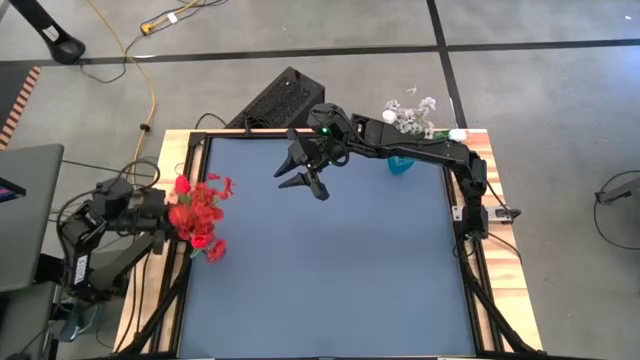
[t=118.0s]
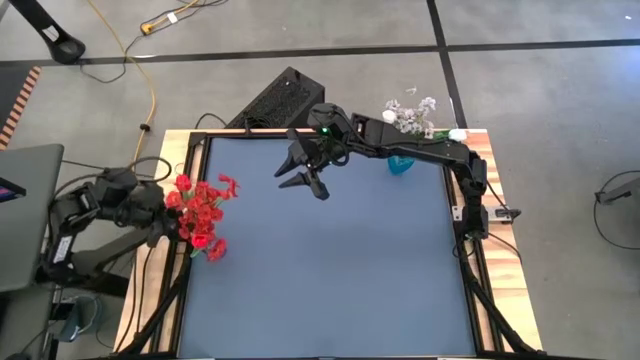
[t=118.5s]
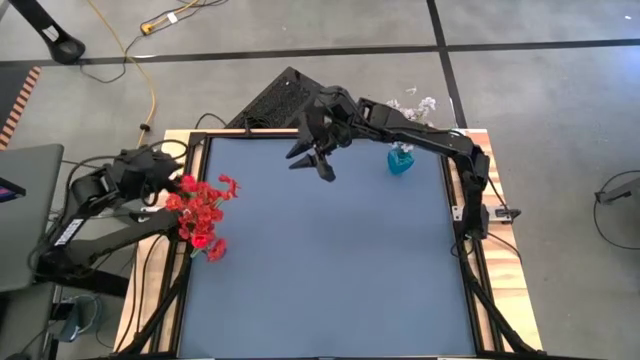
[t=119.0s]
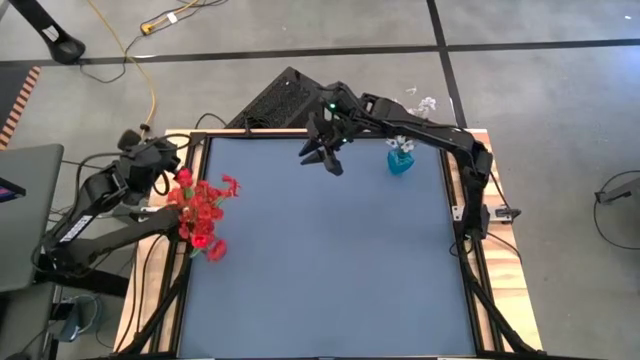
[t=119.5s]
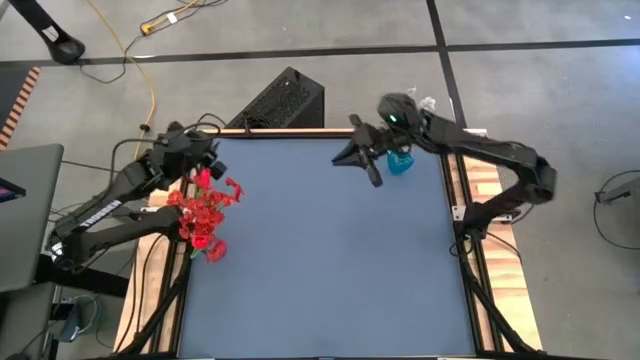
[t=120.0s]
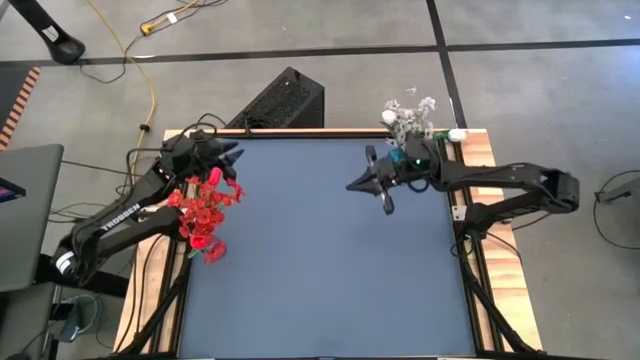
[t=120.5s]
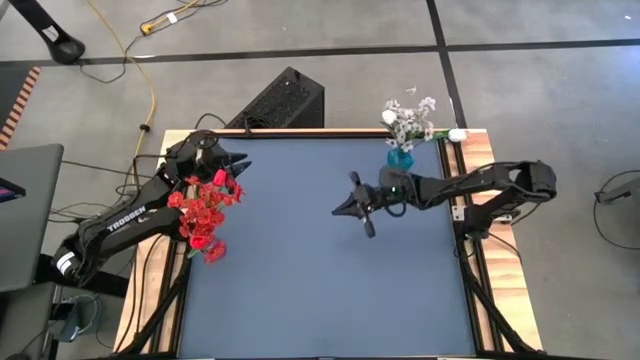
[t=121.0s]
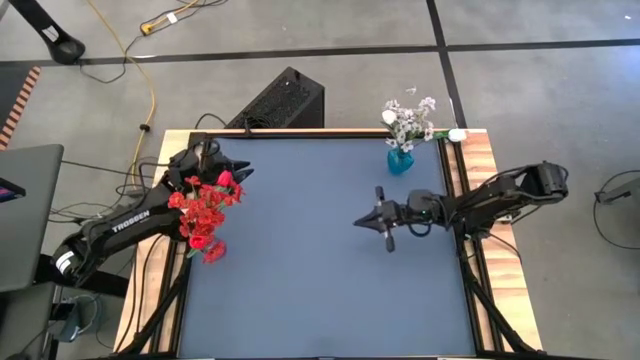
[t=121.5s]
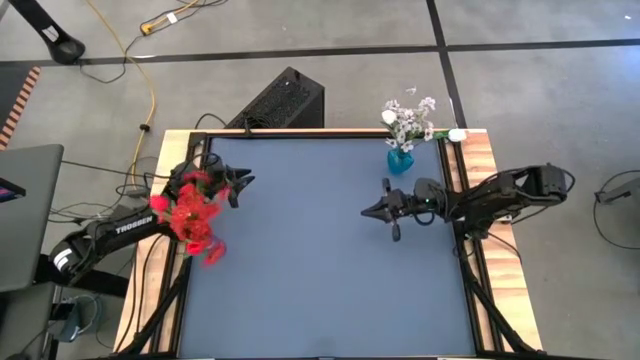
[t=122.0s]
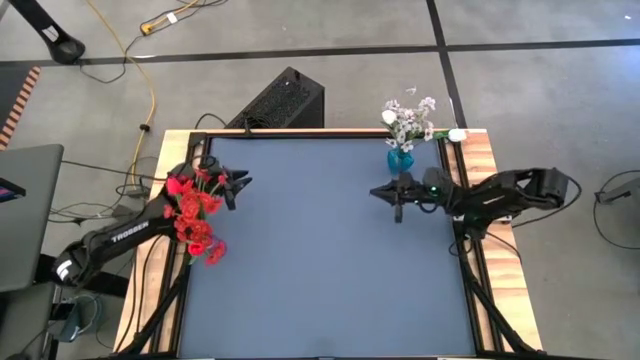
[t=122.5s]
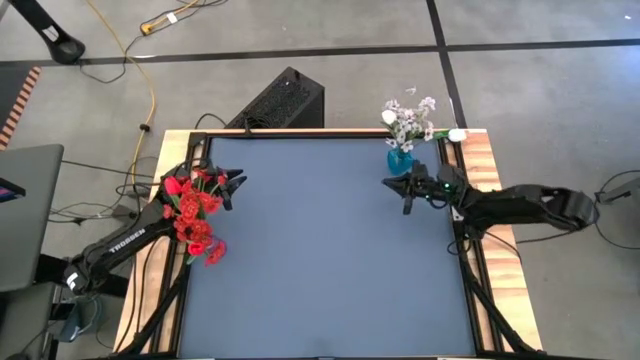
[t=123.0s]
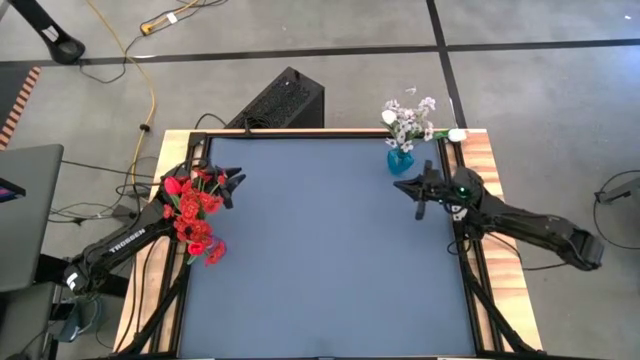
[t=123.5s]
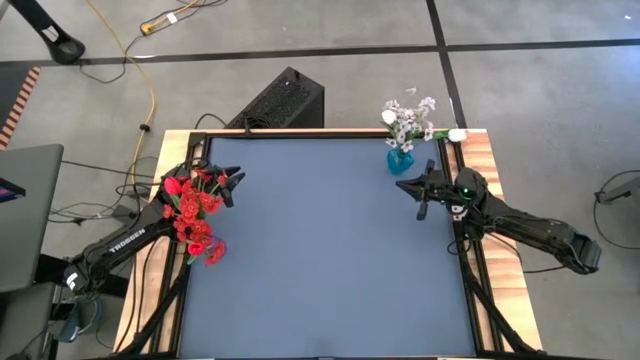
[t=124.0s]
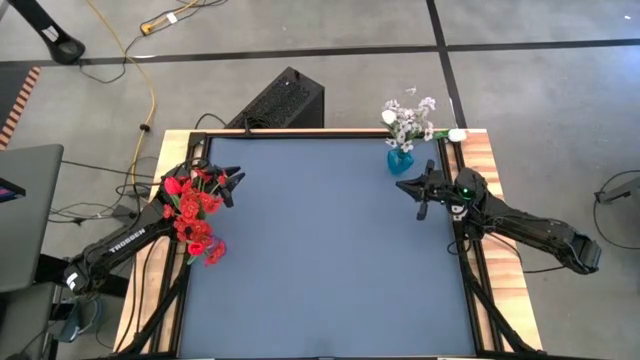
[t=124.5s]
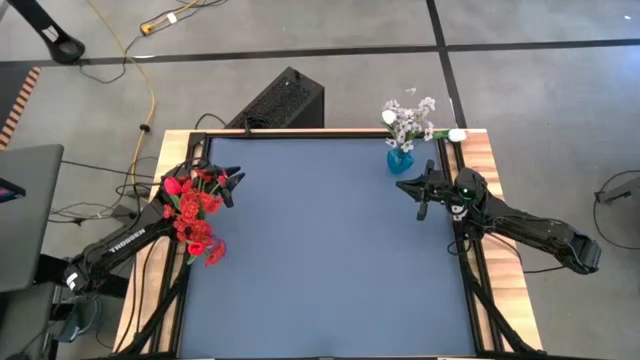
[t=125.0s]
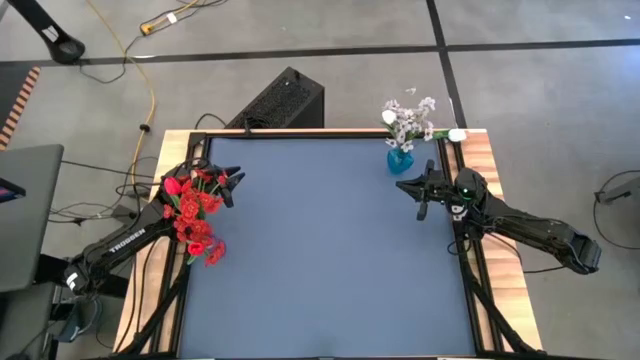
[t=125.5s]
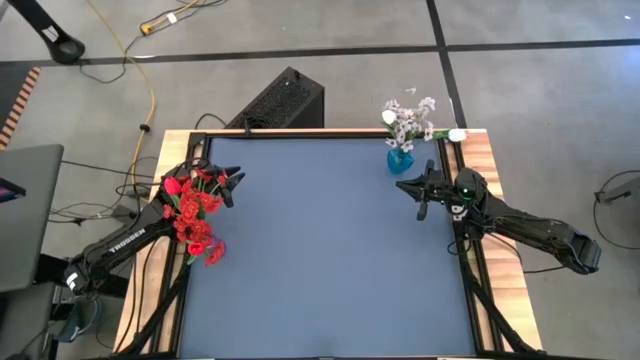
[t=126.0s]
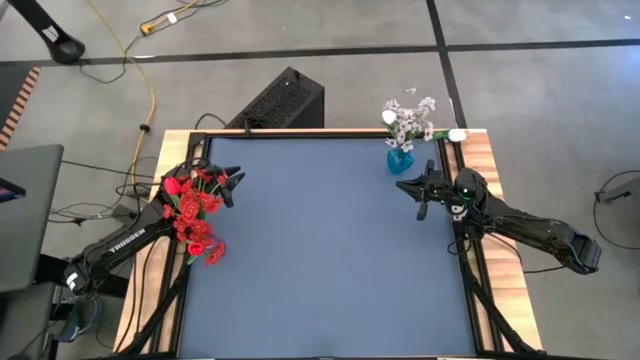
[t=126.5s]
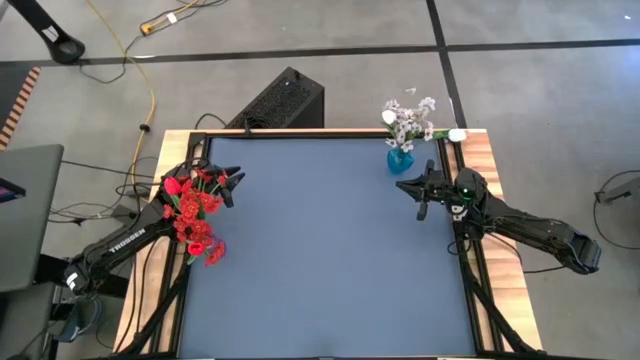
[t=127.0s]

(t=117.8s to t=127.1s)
Task: Sort flowers into vase by color
Return to Home Position

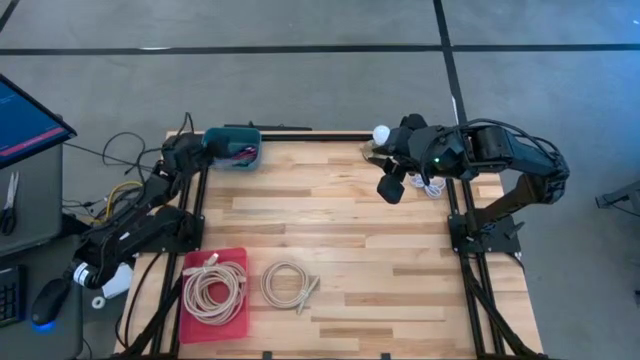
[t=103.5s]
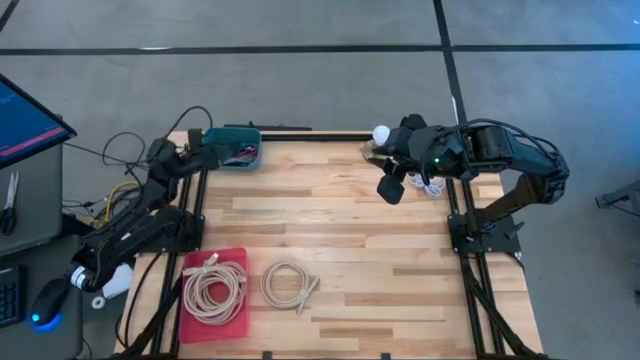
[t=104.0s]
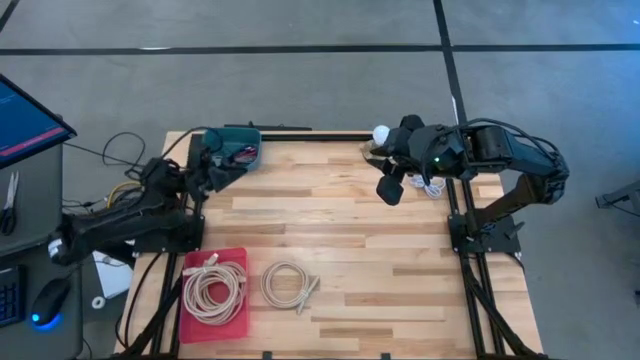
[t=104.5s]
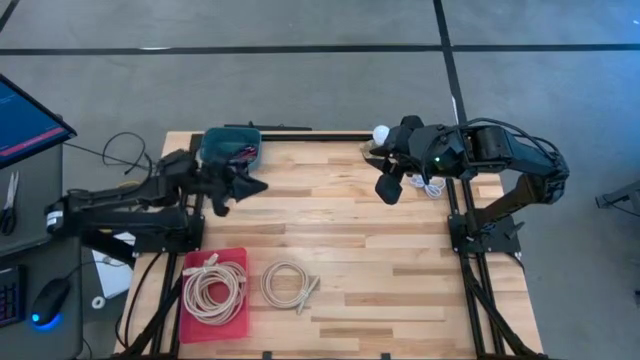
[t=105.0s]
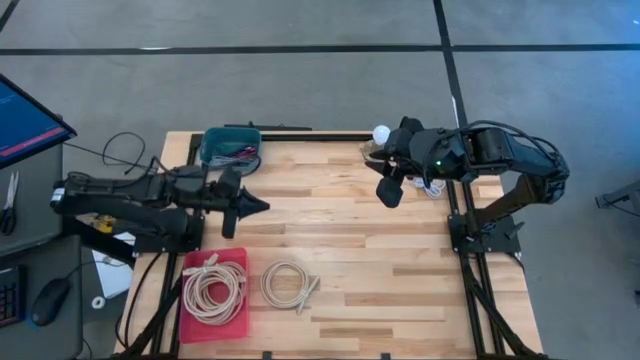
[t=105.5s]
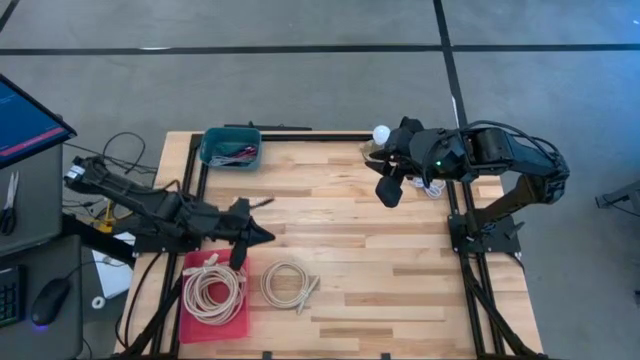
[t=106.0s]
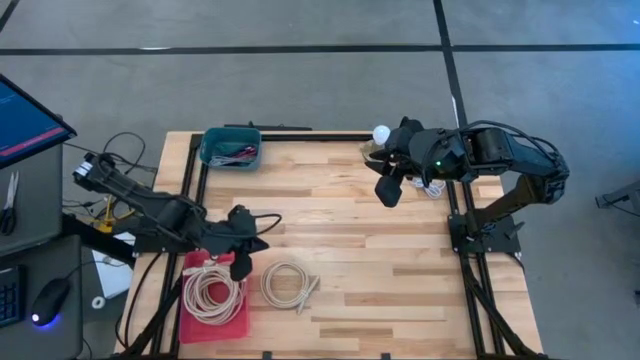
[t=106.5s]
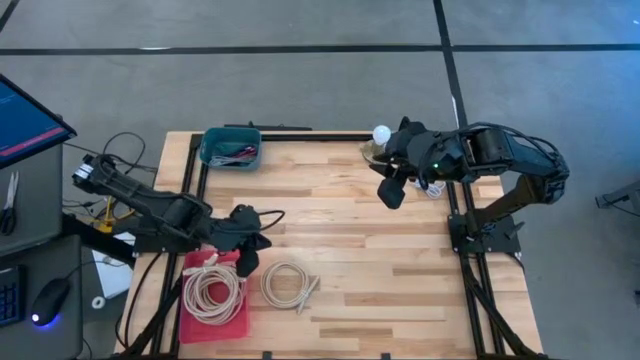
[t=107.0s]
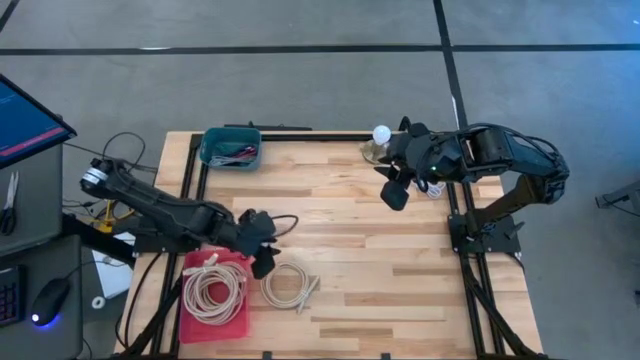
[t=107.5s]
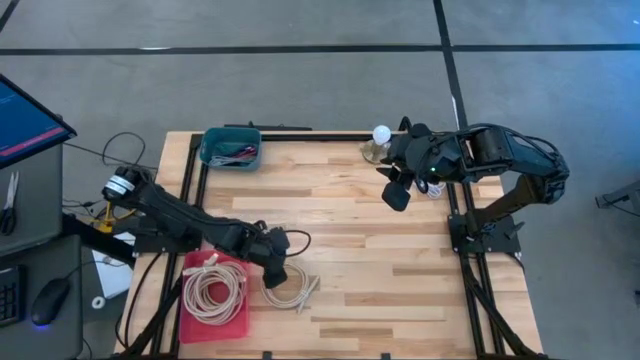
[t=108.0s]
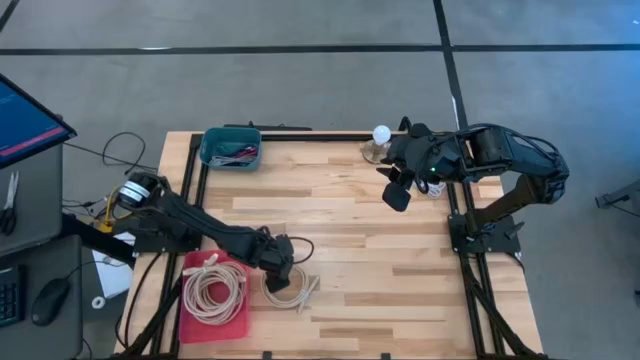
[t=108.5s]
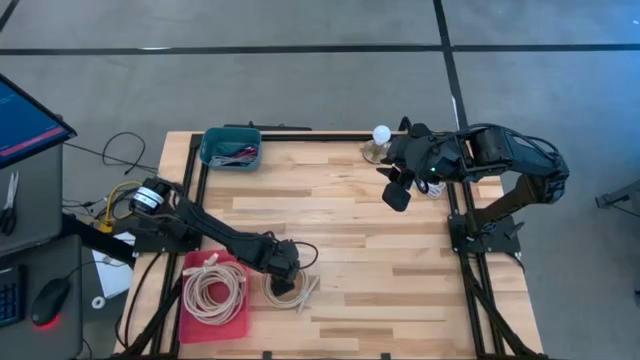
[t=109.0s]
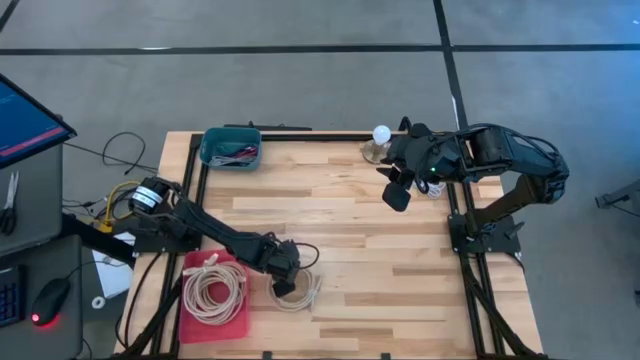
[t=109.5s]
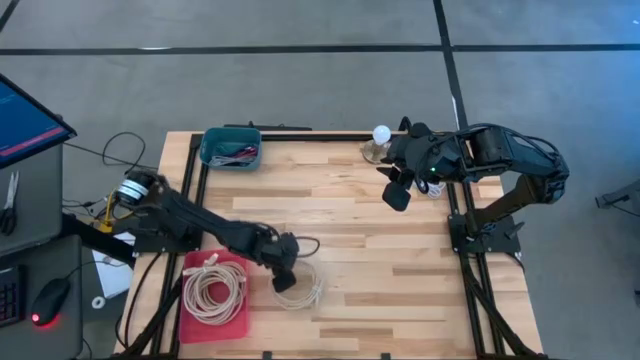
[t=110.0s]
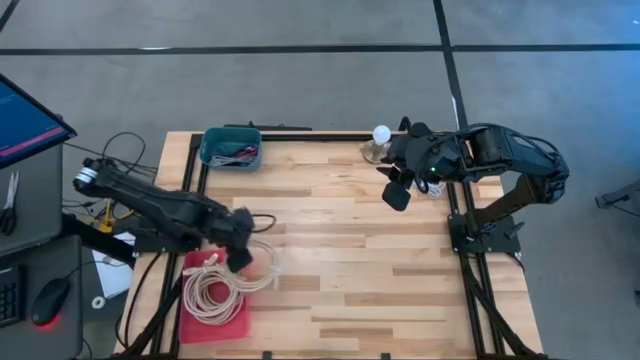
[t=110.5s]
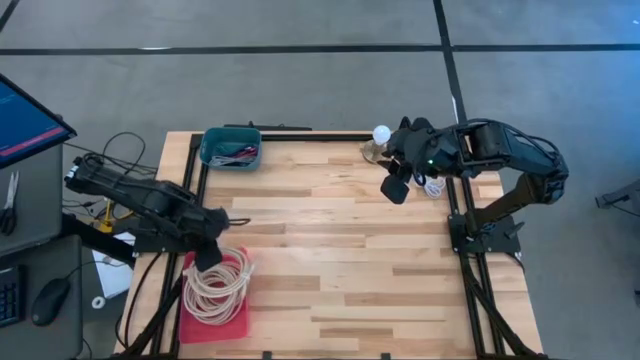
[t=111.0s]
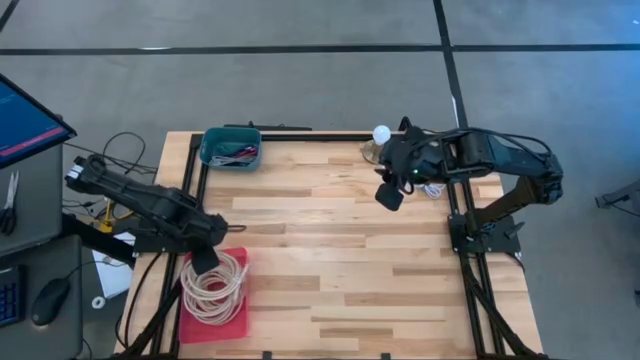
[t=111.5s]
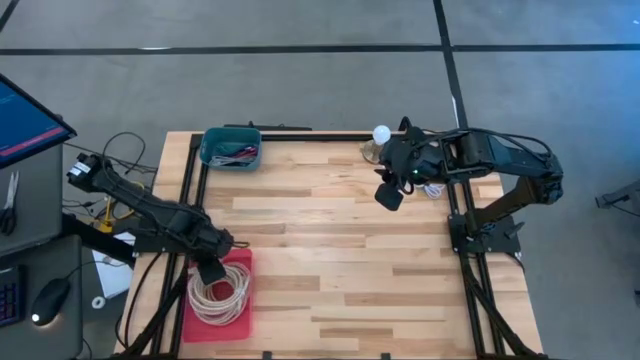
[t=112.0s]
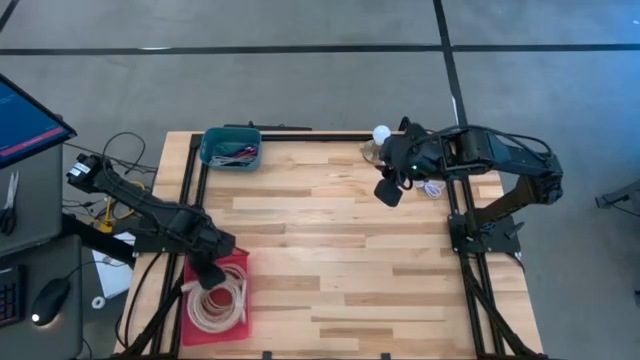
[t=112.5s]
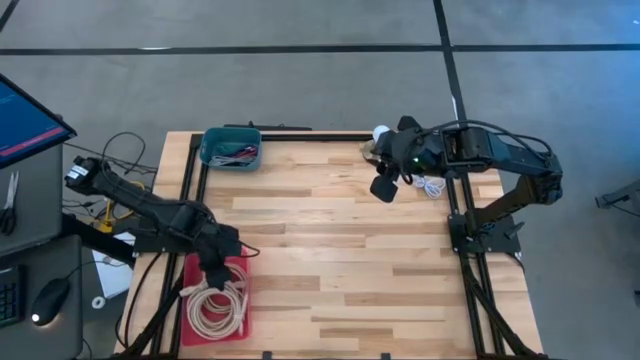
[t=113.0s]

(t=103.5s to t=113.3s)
Task: Pick & Place USB Port
Put the brown HDMI cable into the red bin

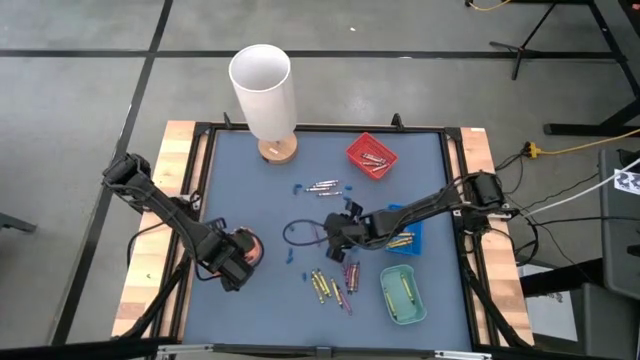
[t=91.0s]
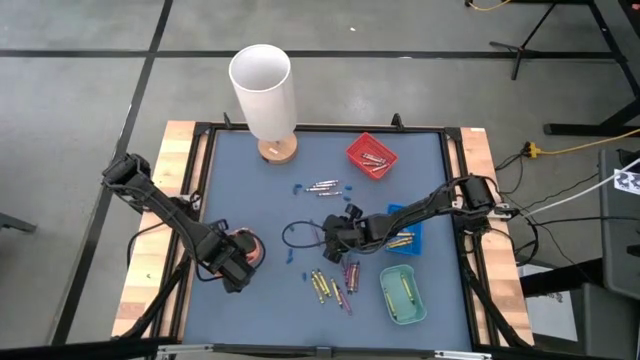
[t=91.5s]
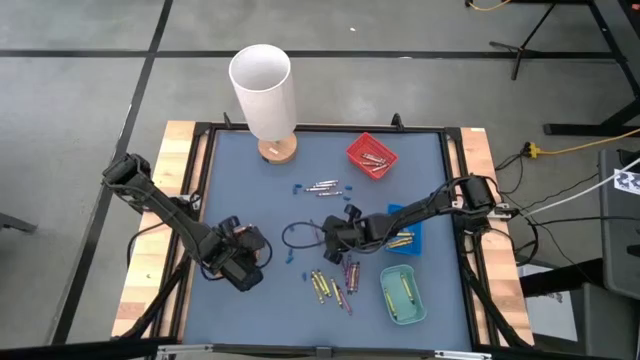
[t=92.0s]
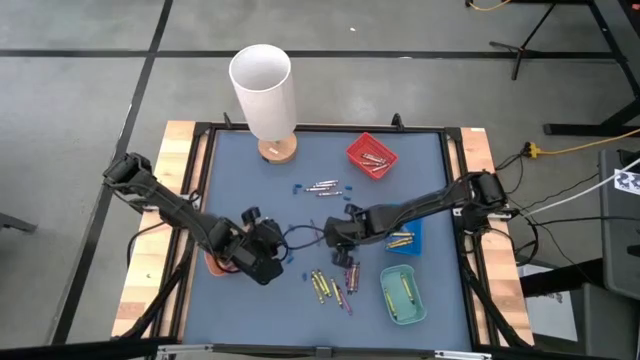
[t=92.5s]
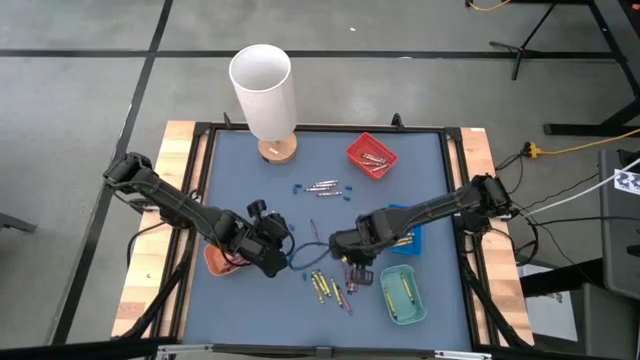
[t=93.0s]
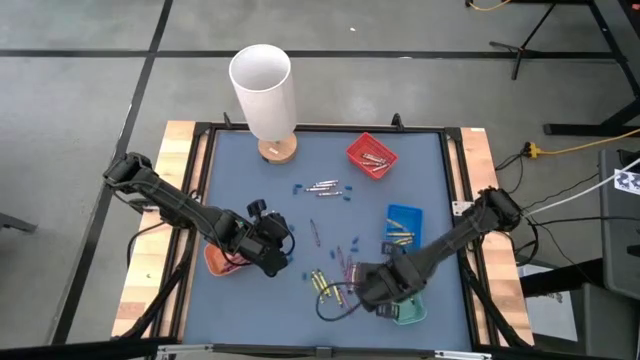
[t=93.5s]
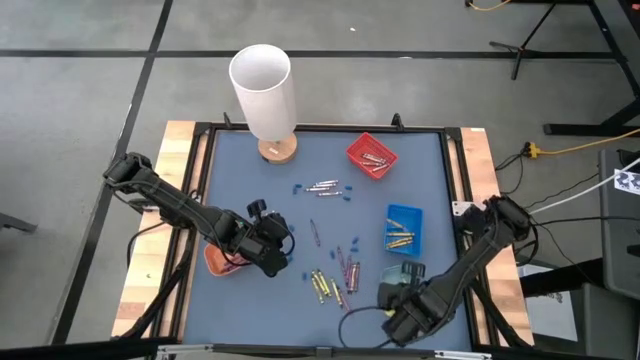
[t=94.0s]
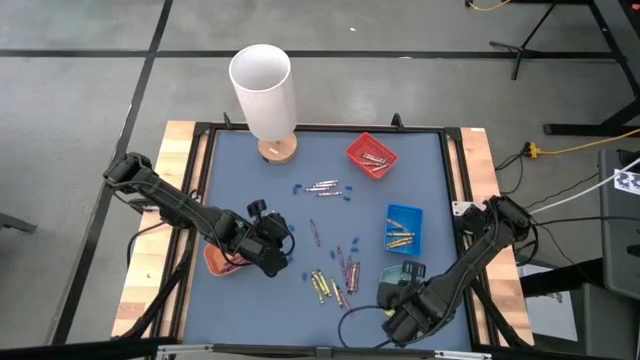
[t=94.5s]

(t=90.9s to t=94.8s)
Task: Sort crayons
Put the green crayon into the green bin
